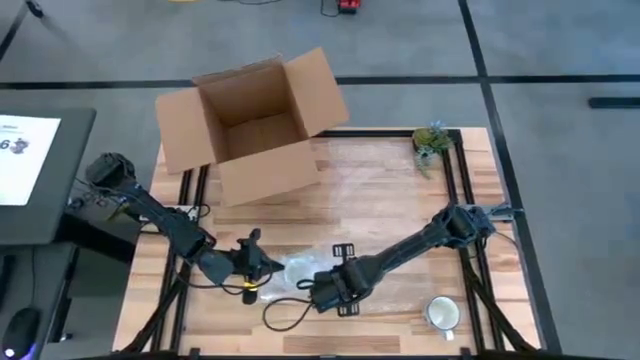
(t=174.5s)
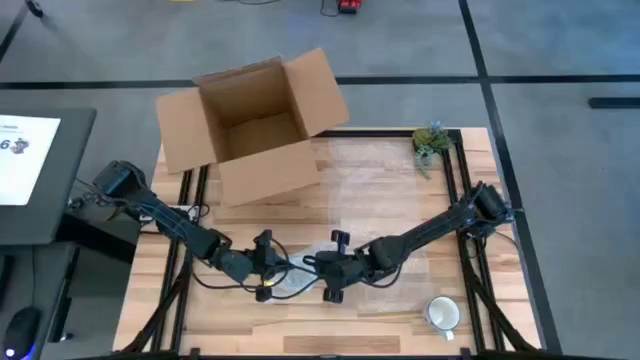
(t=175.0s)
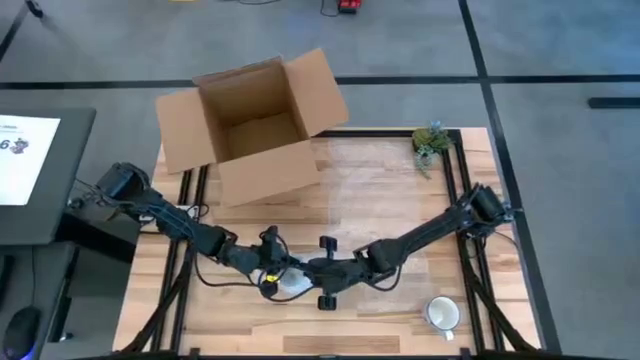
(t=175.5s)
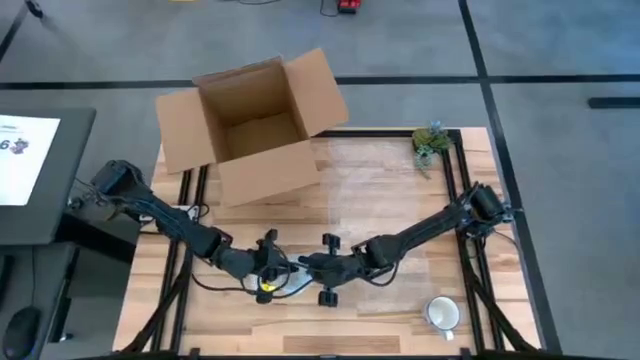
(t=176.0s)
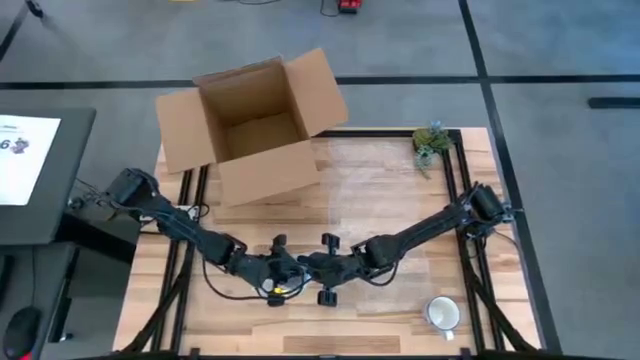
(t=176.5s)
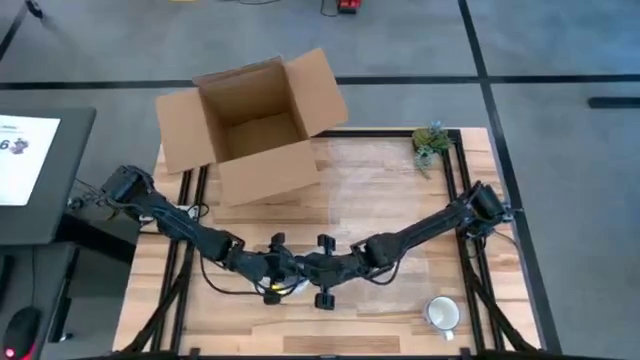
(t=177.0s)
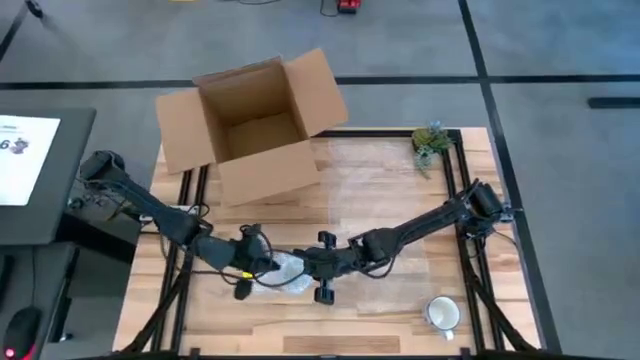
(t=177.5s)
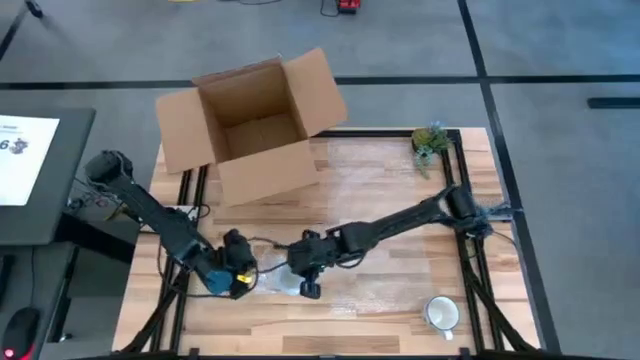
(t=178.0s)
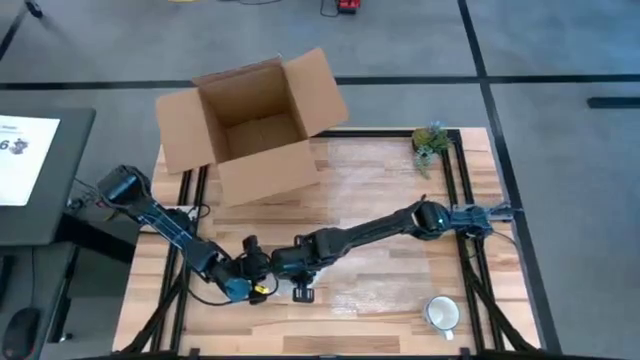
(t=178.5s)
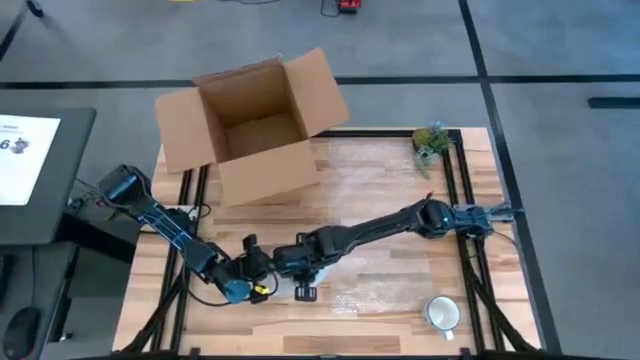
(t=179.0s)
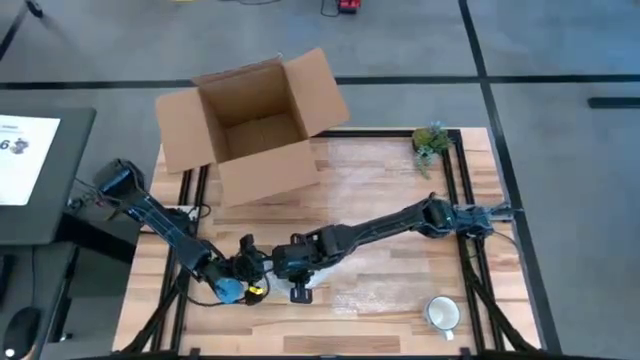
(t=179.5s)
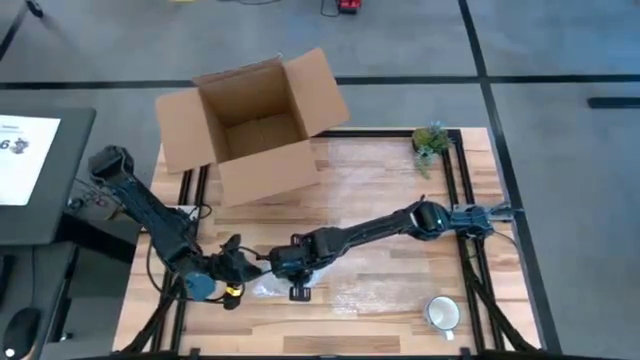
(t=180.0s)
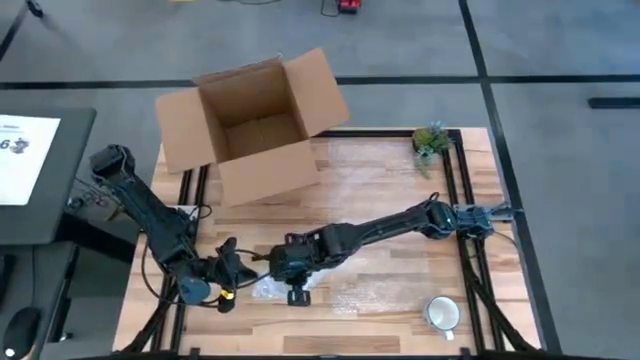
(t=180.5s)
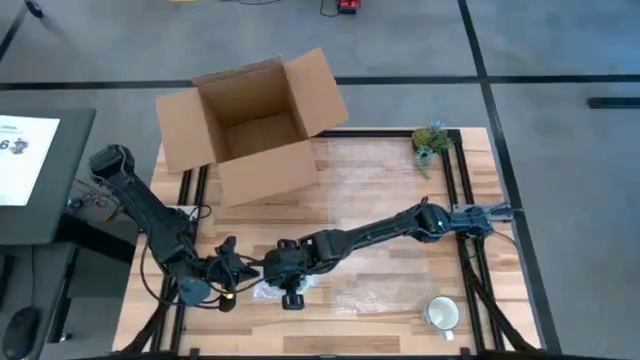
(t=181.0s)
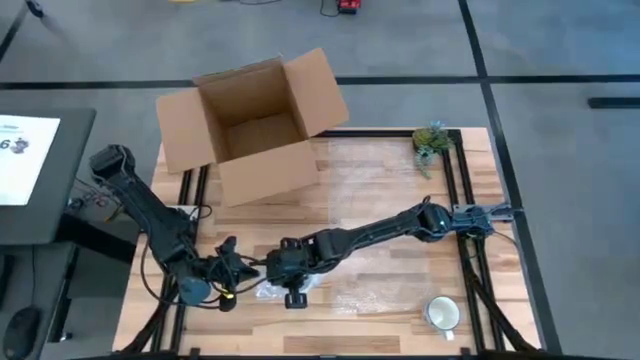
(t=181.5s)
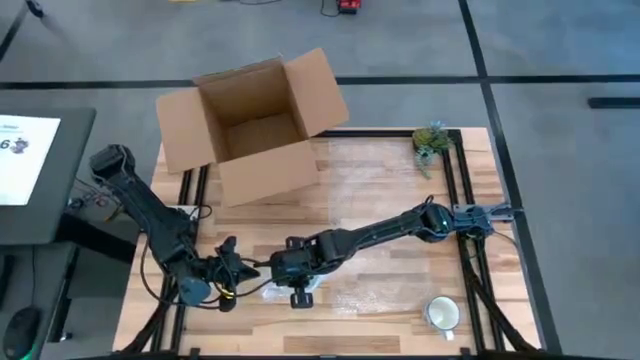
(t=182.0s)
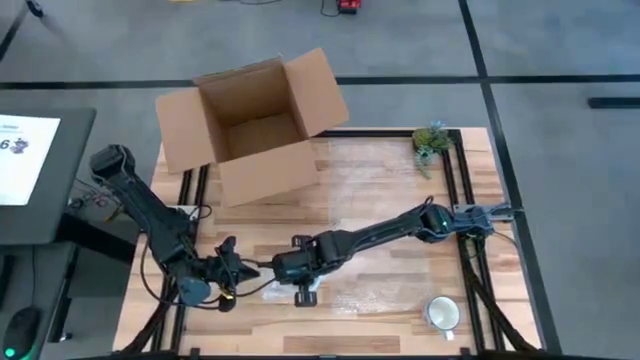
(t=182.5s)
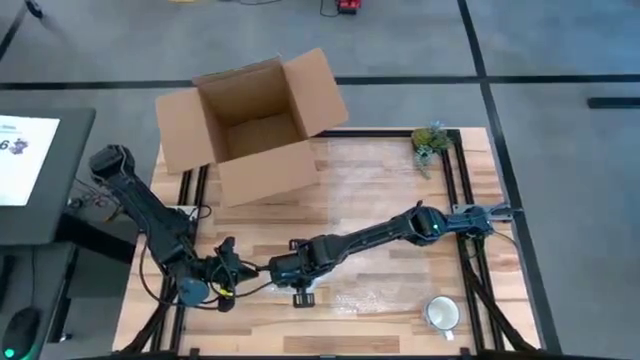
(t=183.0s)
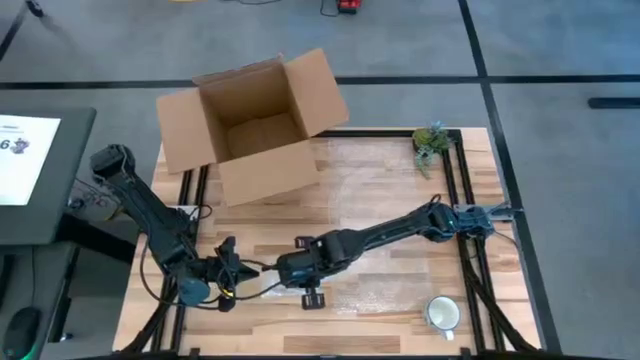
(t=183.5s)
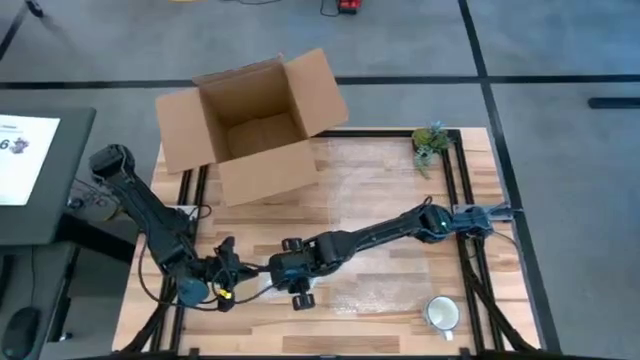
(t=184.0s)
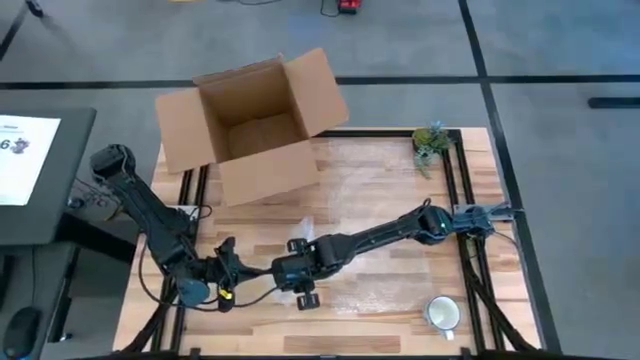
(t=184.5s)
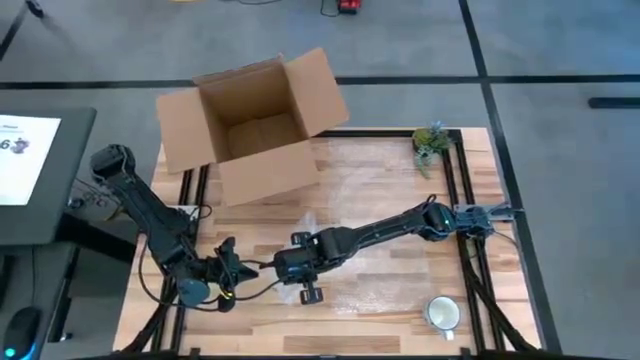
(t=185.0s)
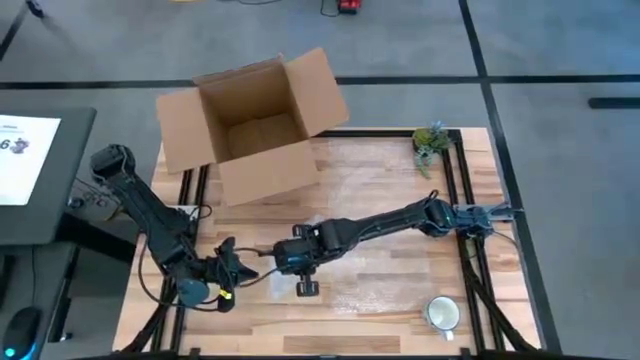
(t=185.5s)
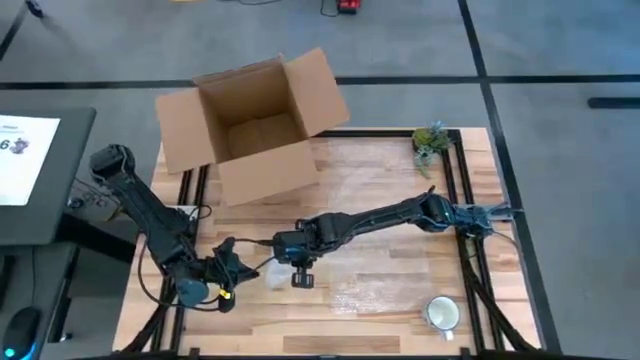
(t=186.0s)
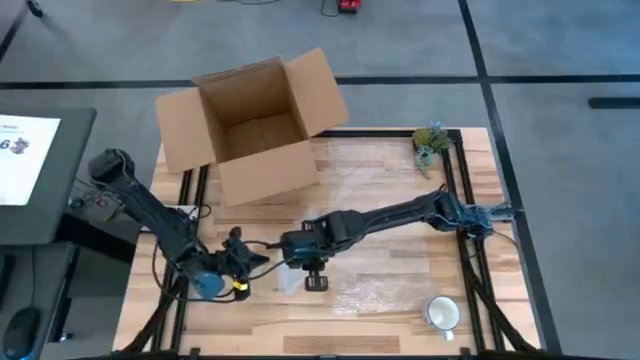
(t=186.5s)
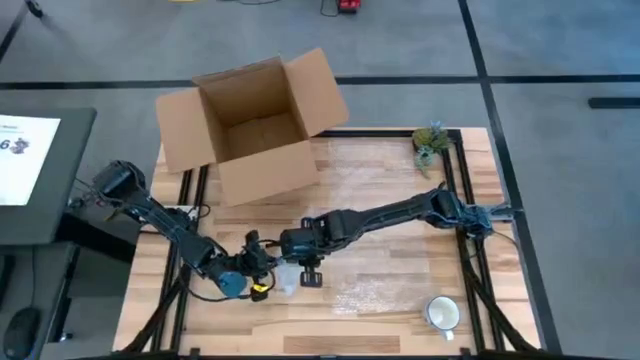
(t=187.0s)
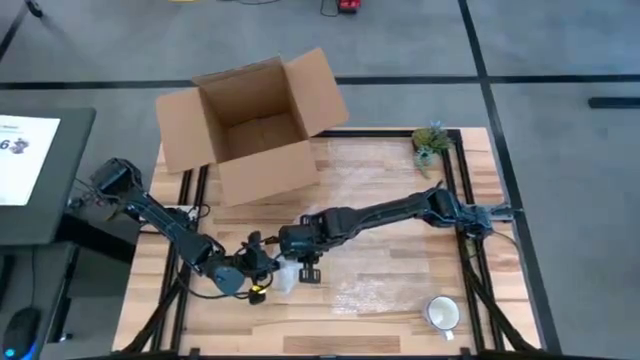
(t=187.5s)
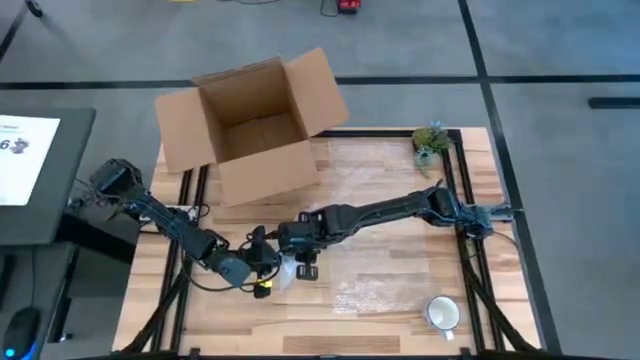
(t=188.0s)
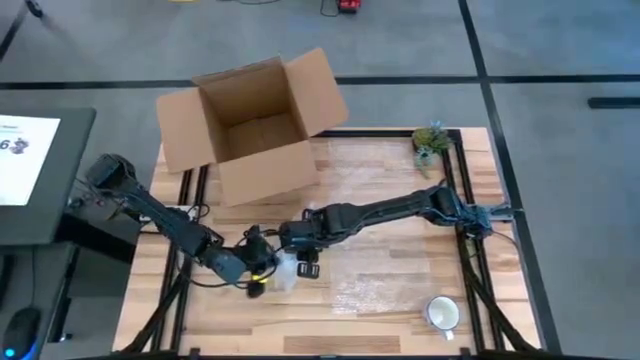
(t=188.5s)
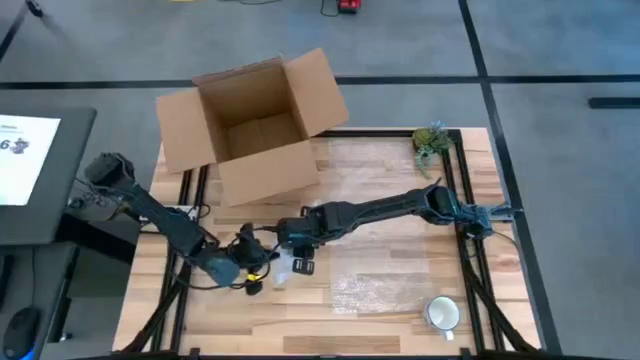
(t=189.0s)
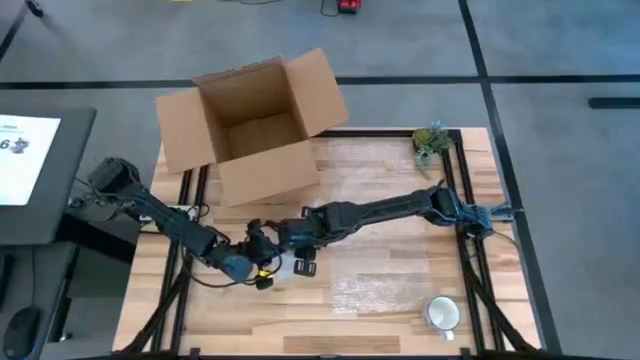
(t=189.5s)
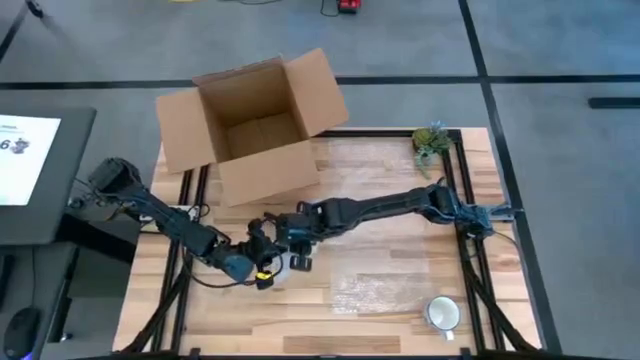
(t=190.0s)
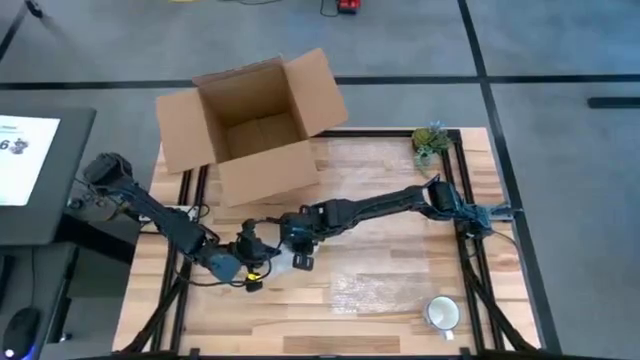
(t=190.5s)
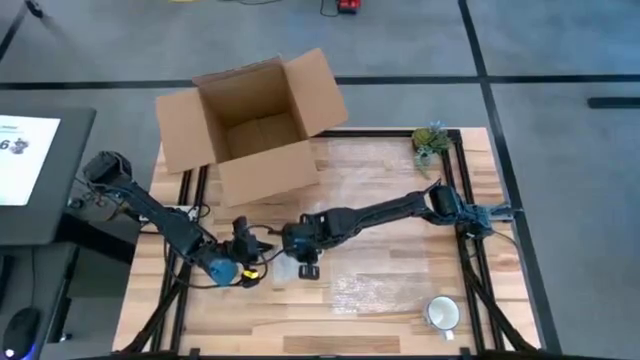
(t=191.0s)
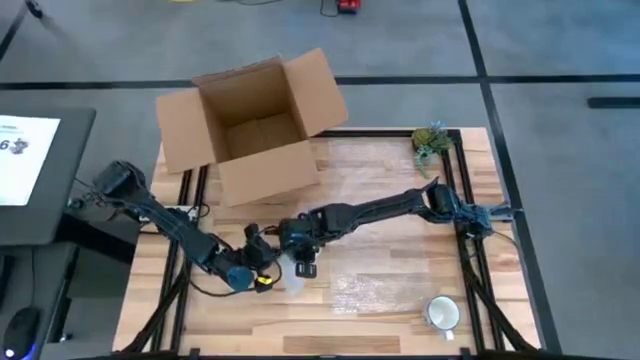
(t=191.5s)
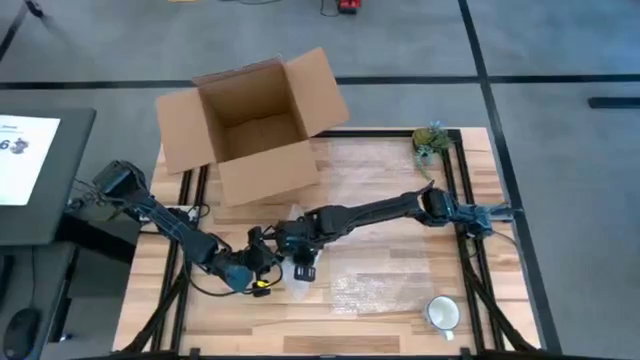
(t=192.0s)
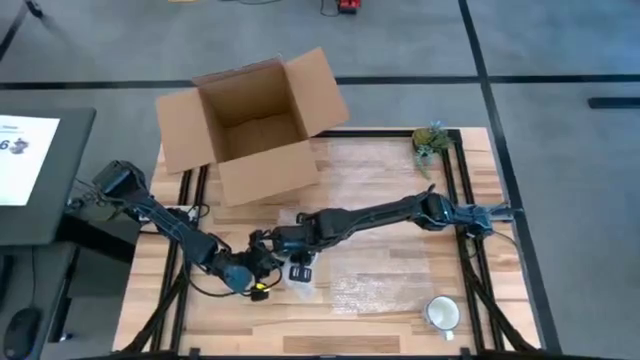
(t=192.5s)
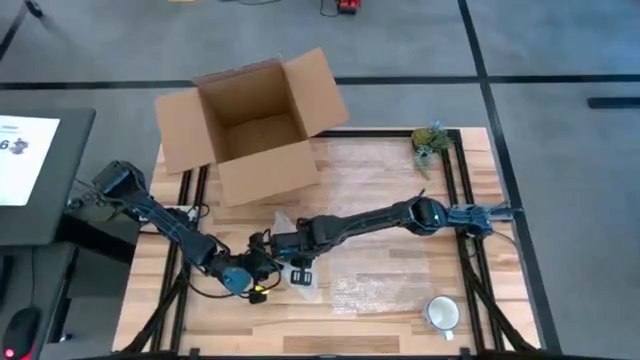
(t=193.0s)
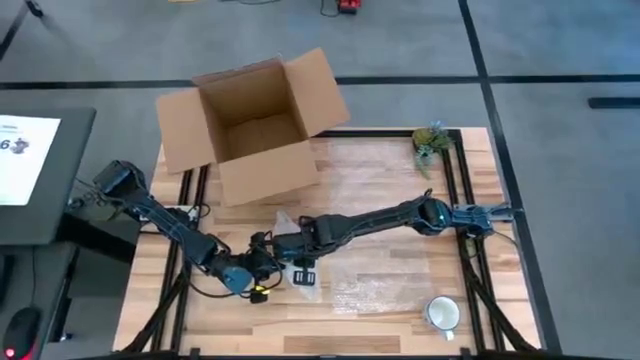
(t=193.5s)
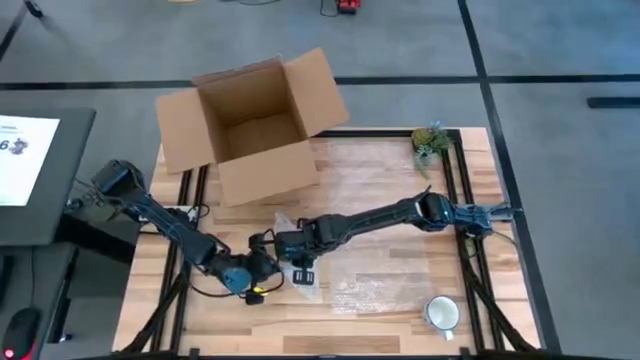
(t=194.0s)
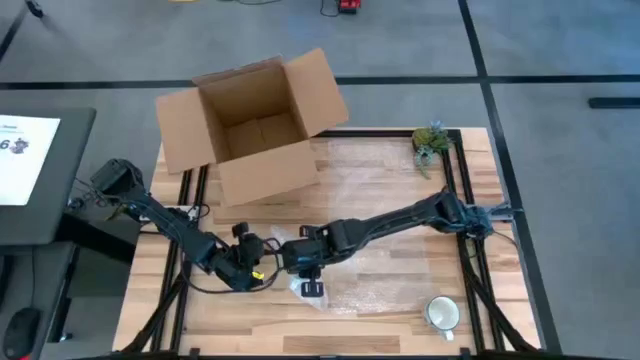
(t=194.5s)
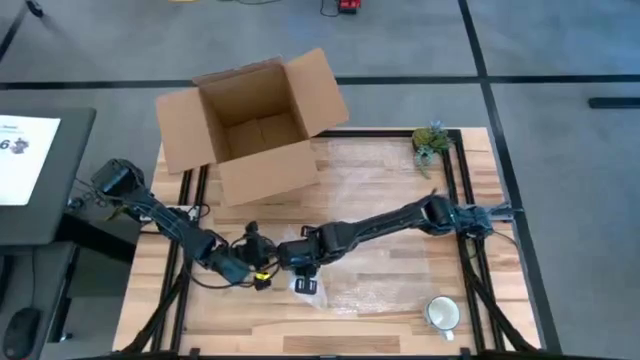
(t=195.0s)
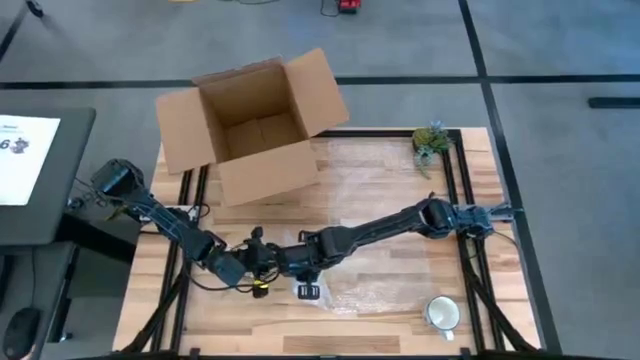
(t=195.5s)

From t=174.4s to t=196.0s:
Task: wrap mug
Wrap the green patterned mug with the bubble wrap
